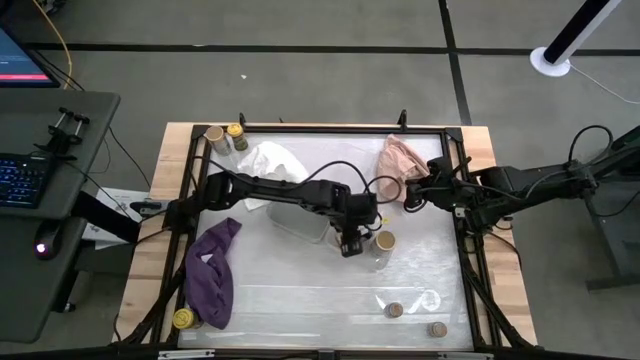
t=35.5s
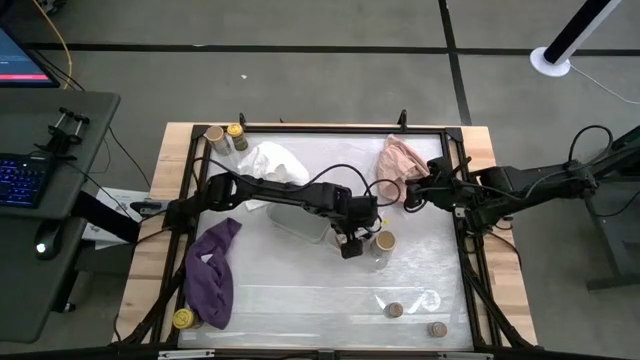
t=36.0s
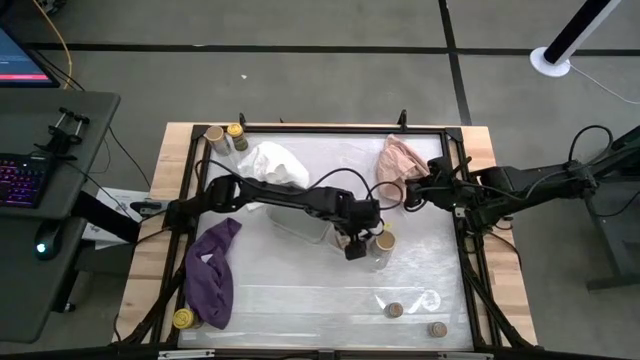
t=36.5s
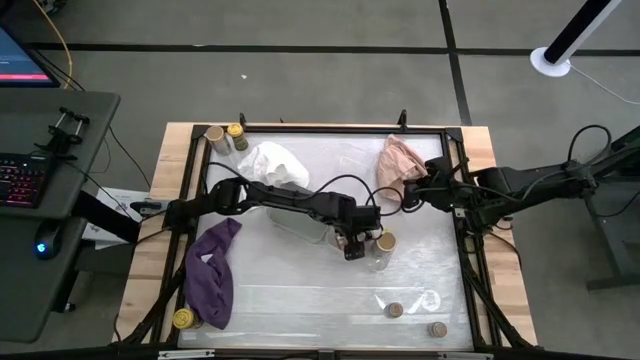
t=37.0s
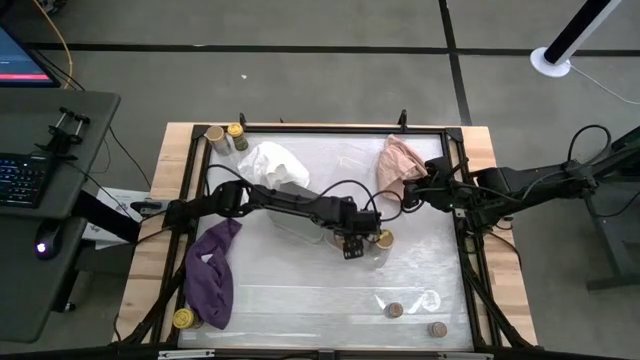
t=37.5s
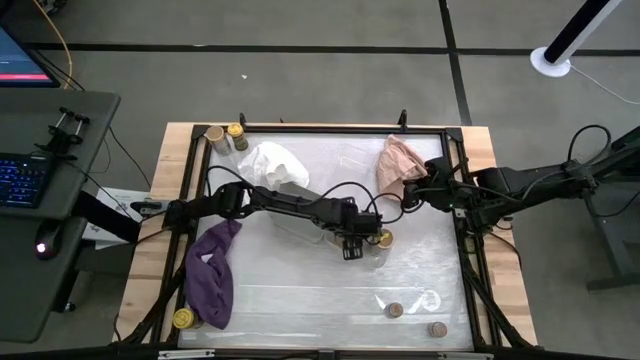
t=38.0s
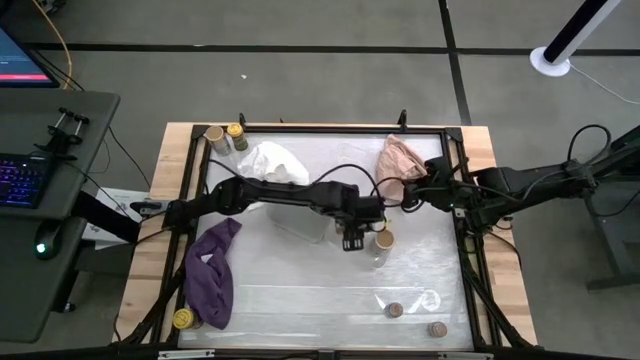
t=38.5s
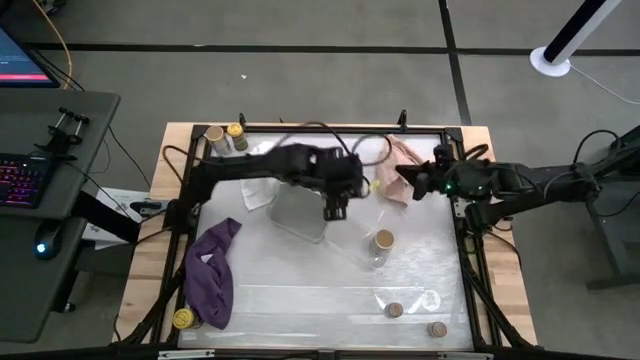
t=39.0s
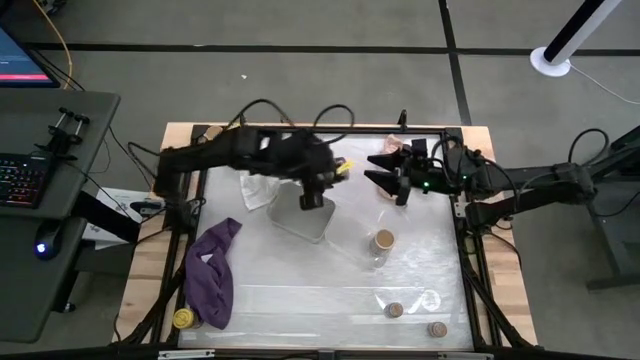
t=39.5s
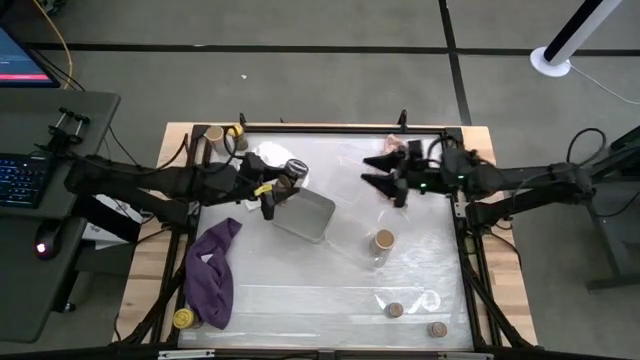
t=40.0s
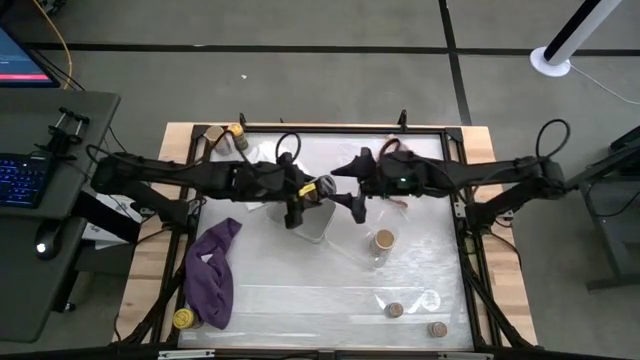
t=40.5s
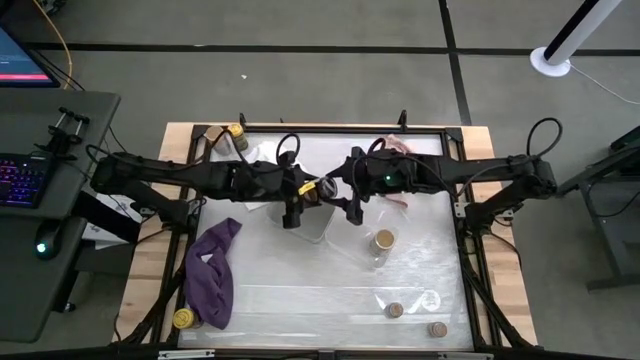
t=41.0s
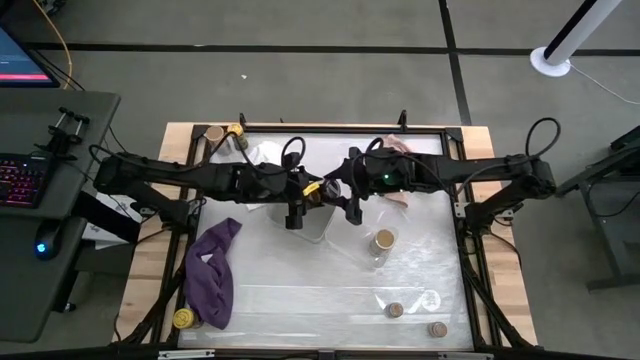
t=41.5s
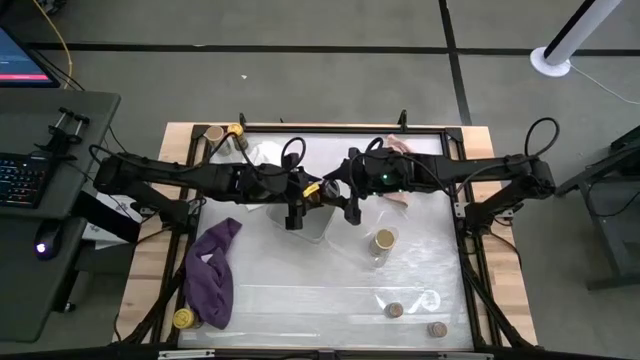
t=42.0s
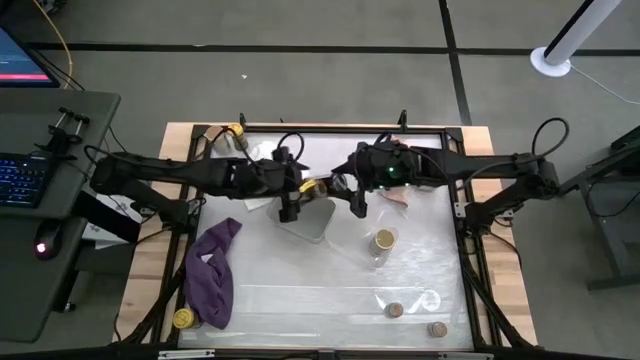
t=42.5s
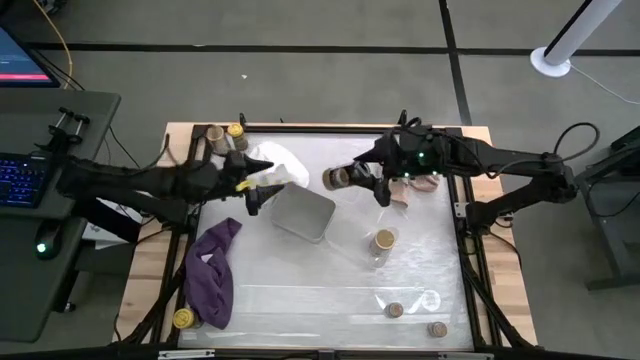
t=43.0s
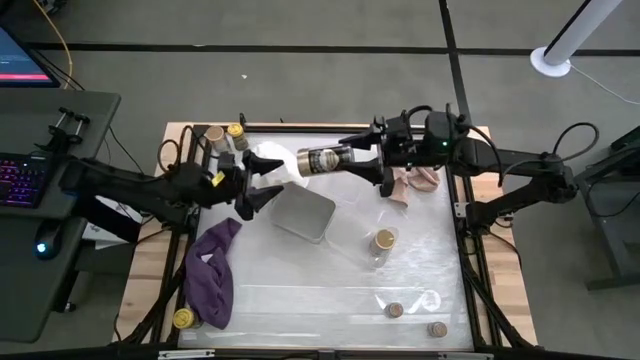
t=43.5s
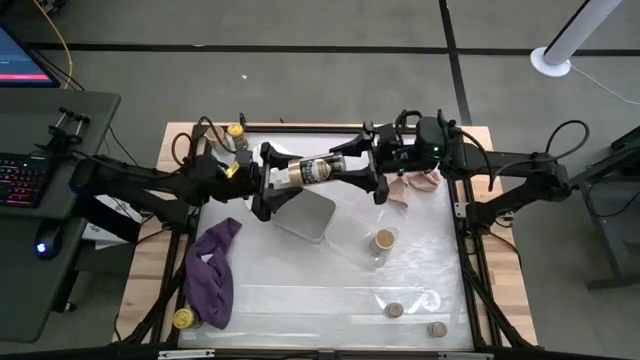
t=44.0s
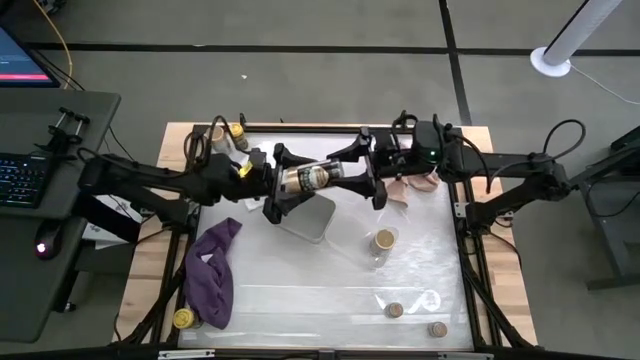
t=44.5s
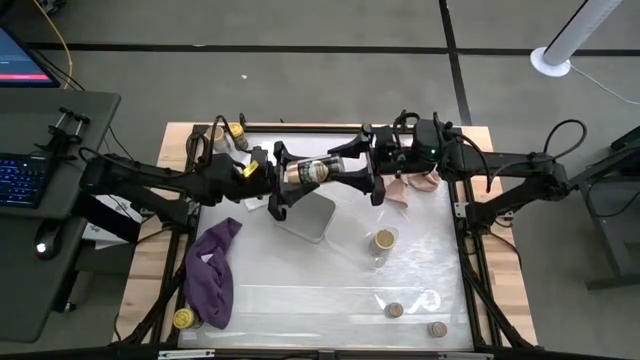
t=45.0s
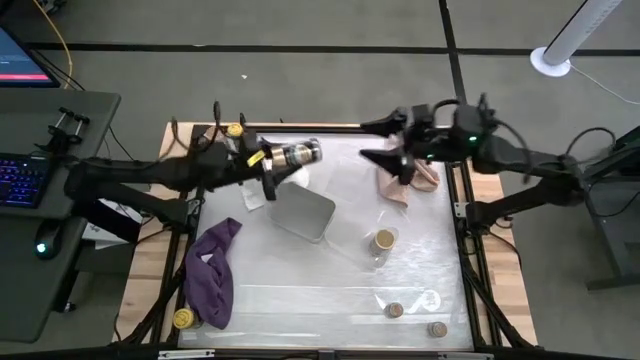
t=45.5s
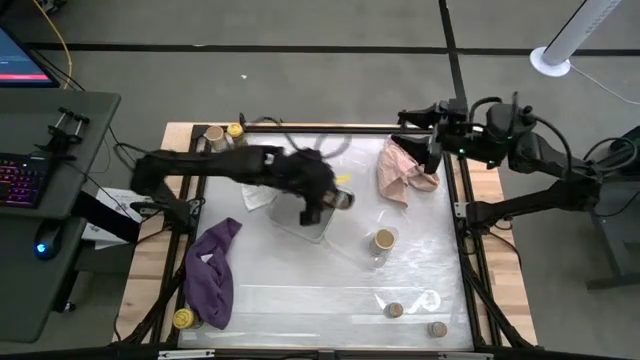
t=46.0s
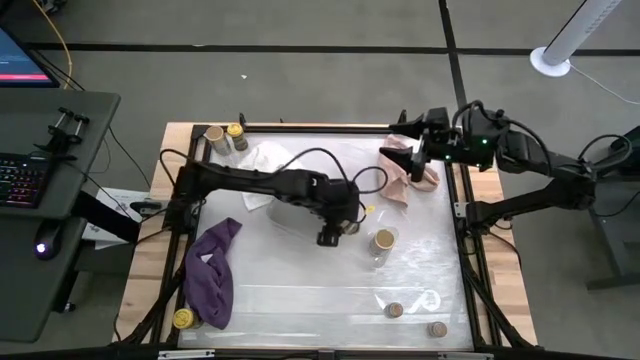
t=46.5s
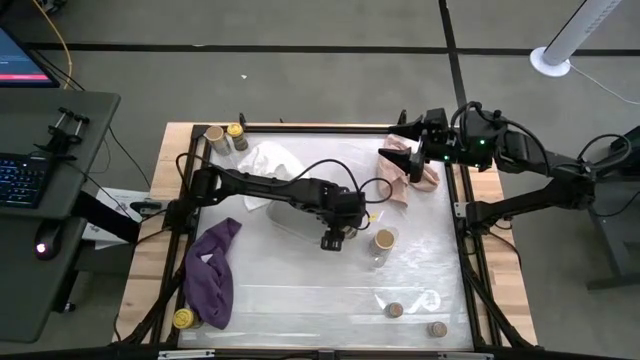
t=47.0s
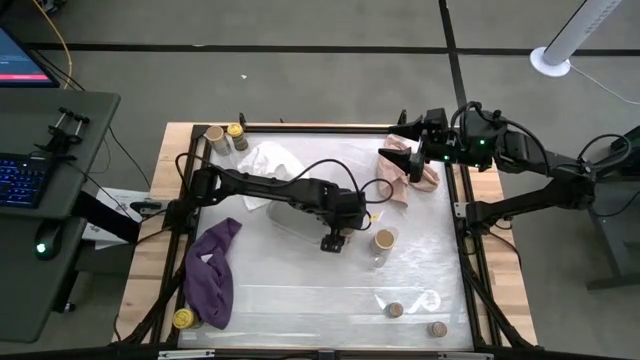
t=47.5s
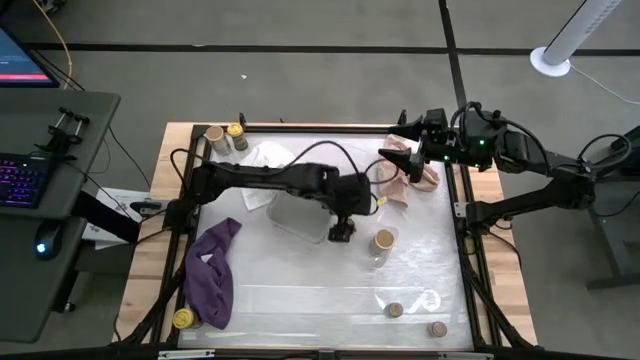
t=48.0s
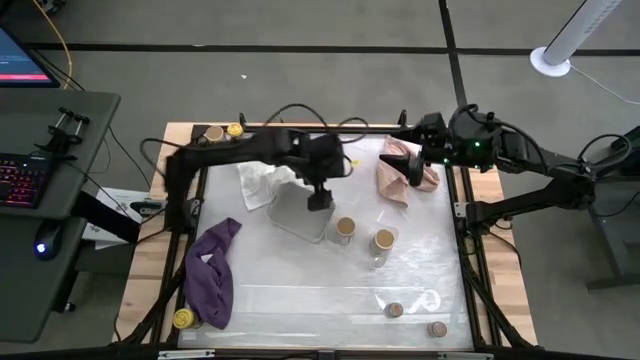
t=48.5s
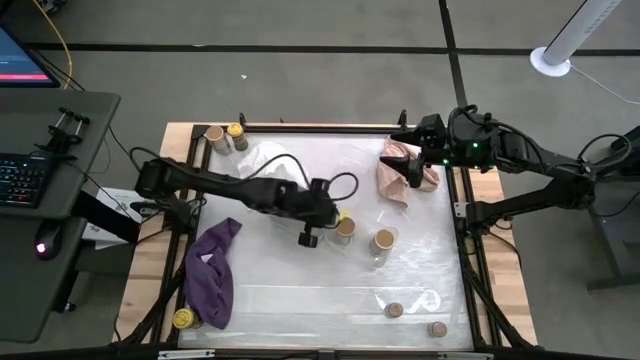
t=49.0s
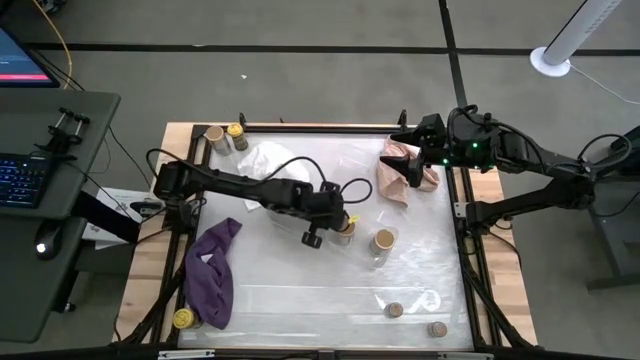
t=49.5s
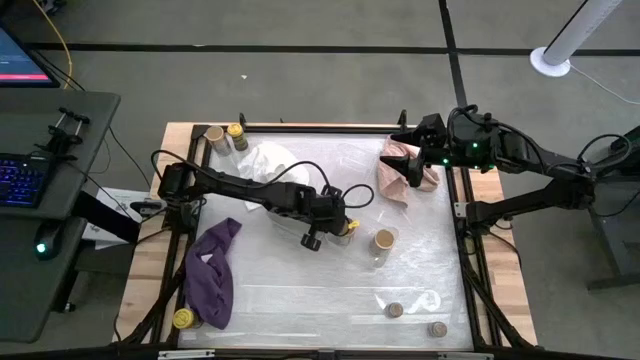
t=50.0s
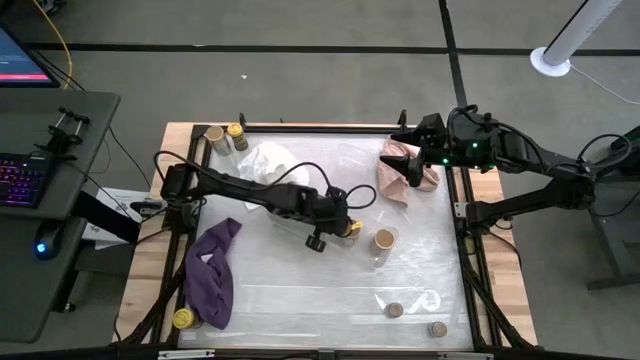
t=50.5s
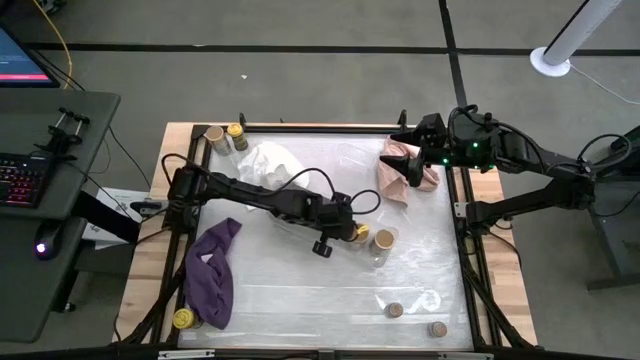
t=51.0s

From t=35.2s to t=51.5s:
Task: Sort spices by type
Put the right gold seasoning bottle into the bottom transparent bin

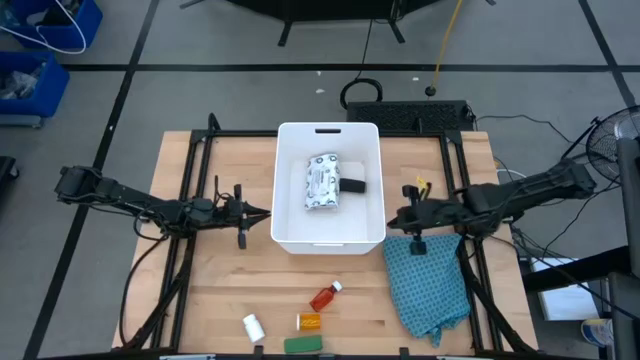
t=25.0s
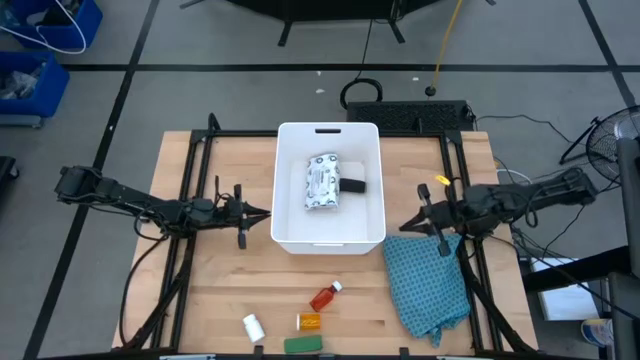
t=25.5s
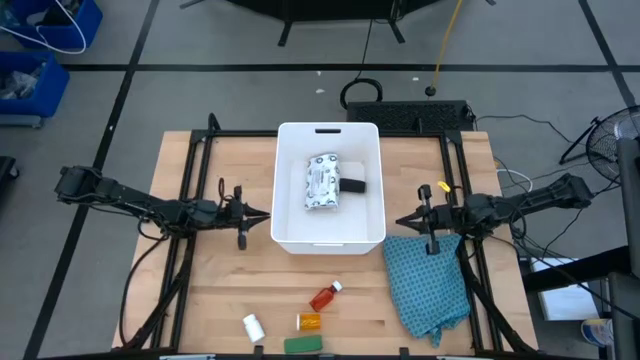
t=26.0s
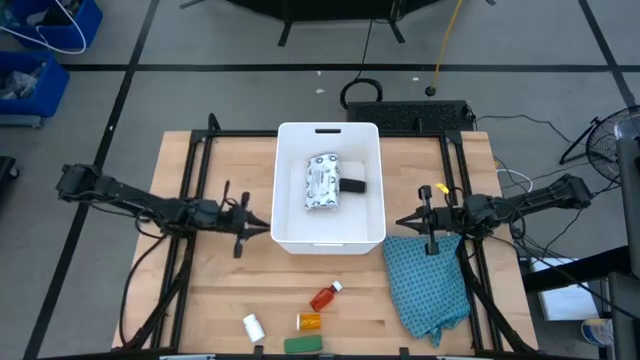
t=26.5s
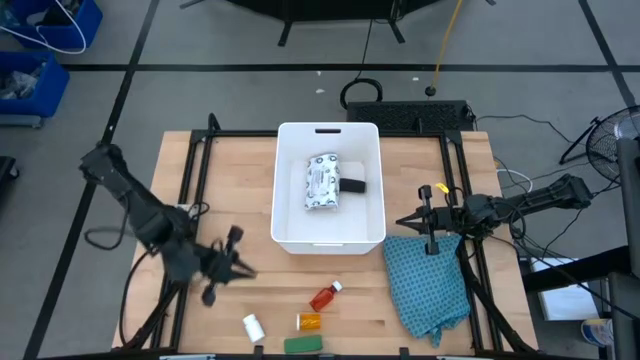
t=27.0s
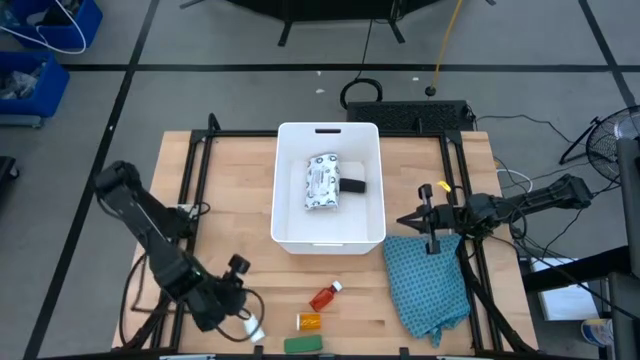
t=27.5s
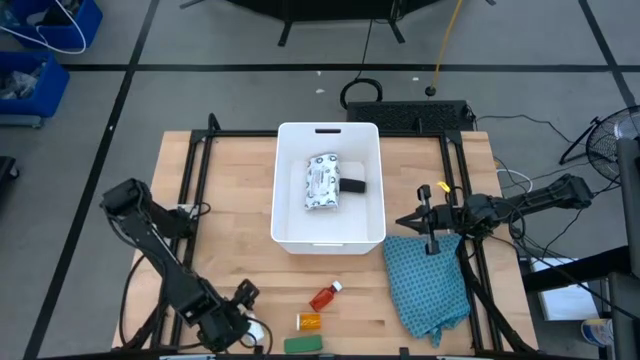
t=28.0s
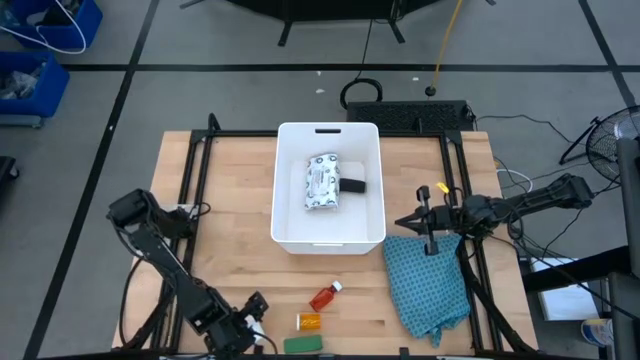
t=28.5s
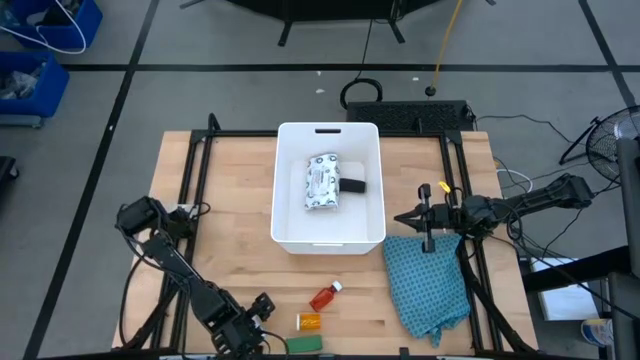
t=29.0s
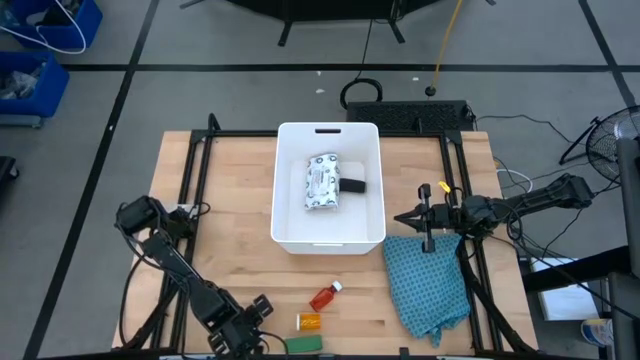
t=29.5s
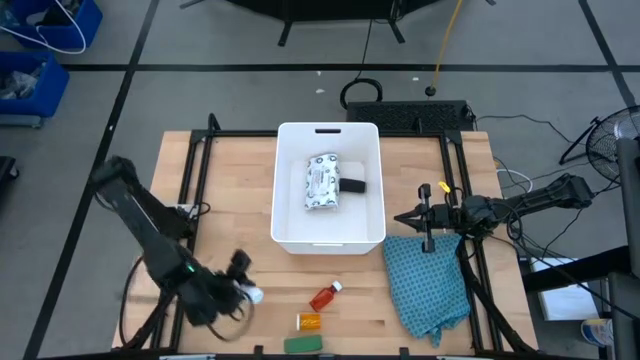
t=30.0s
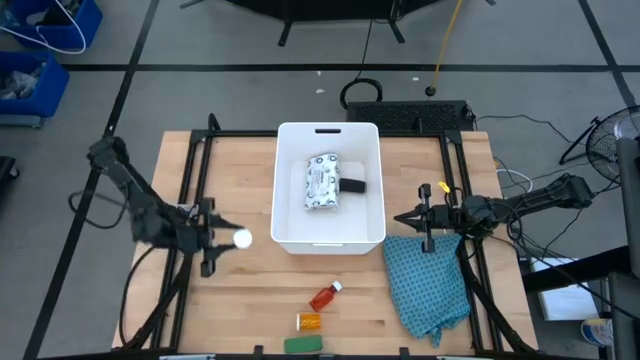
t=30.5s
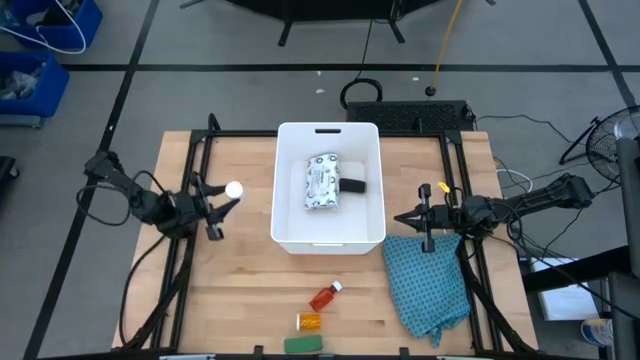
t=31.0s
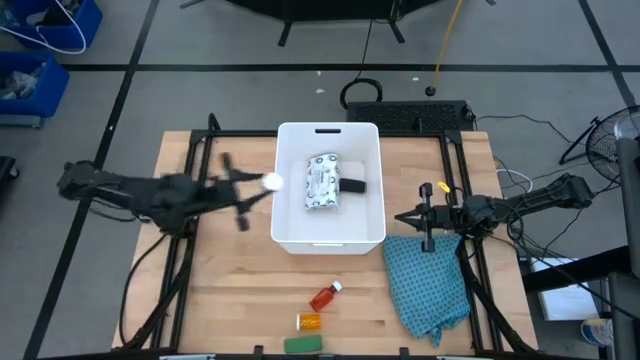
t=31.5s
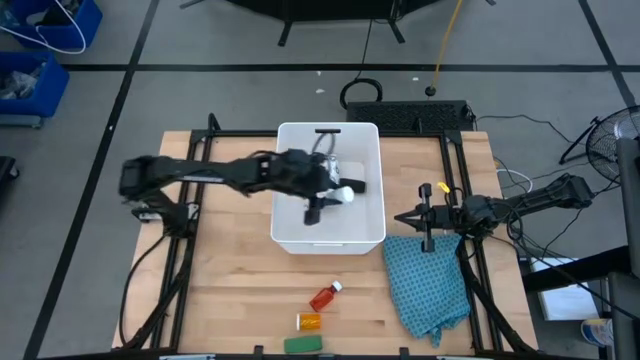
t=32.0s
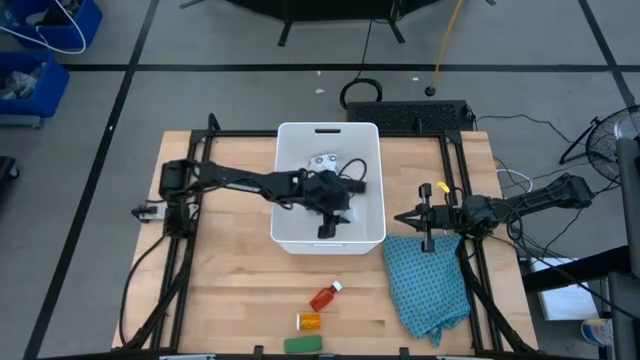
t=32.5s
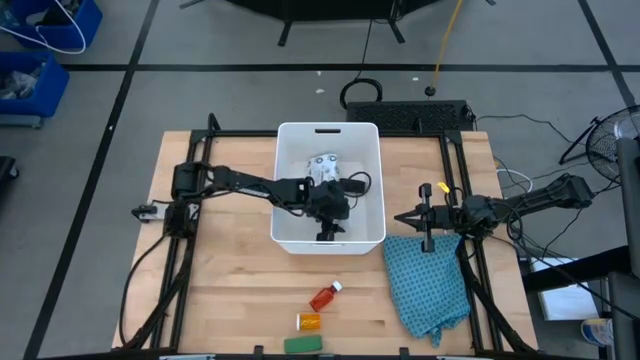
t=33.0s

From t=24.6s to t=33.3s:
Task: Pick & place medical supplies in basket/bin
Put the white pill bottle into the white bin
